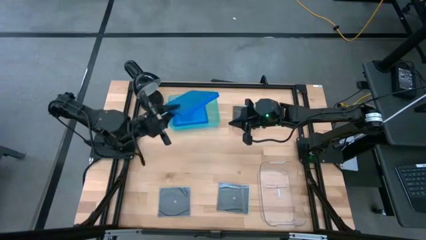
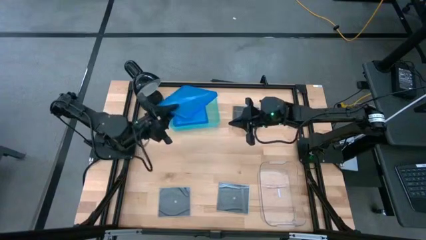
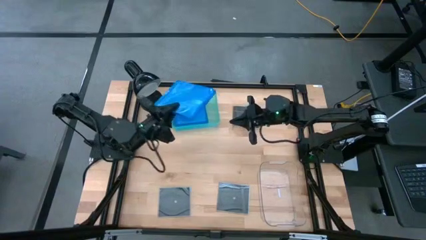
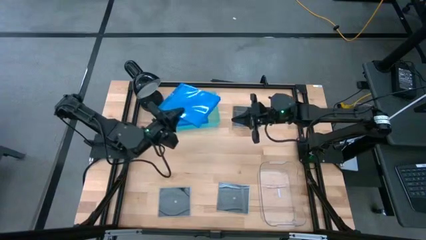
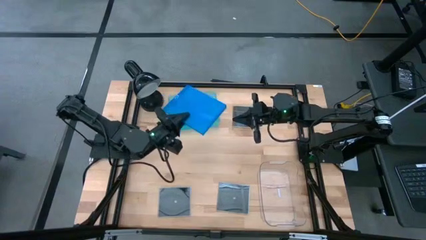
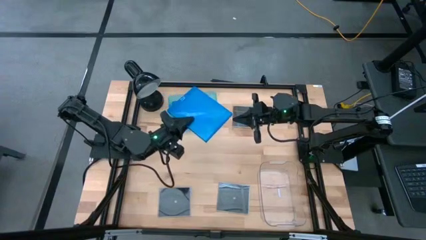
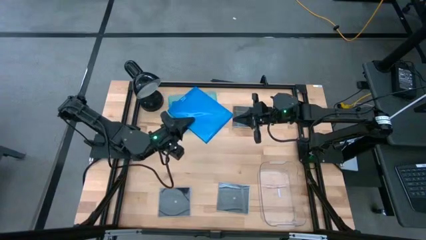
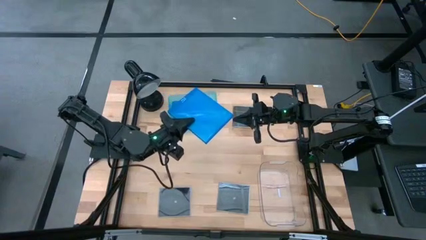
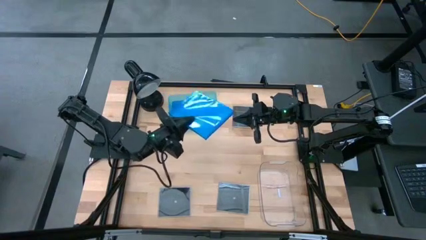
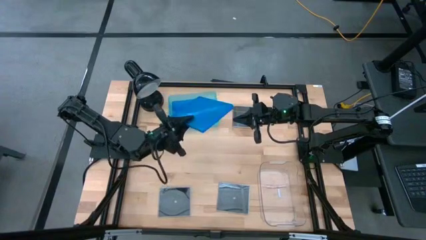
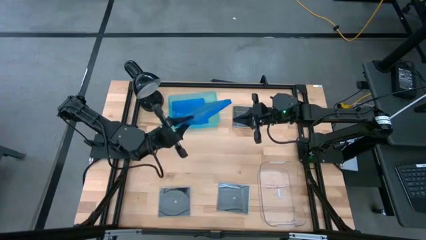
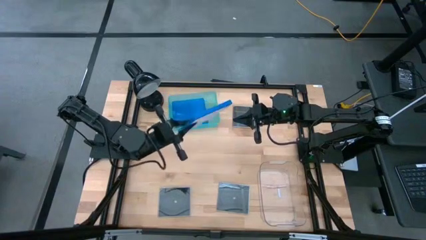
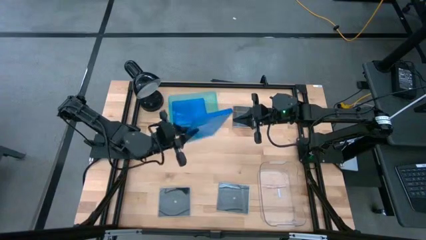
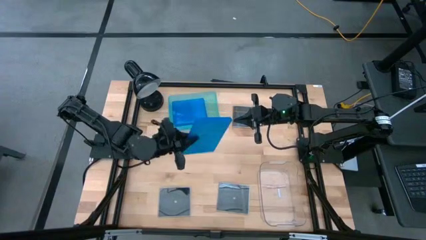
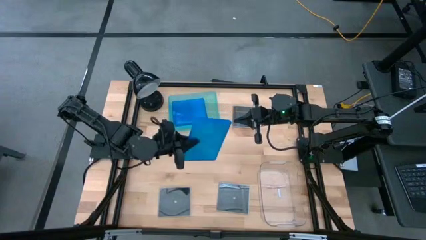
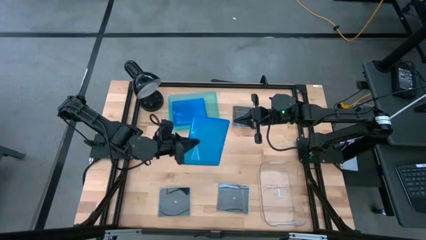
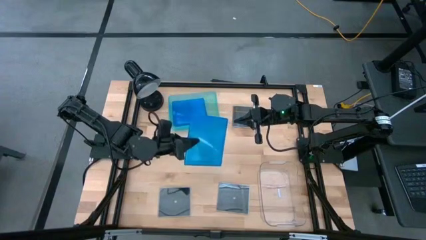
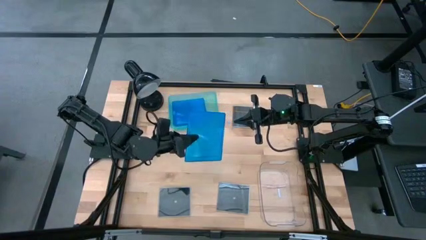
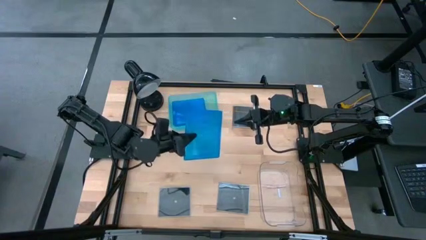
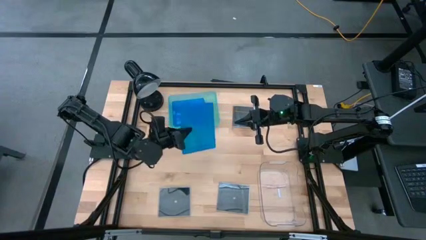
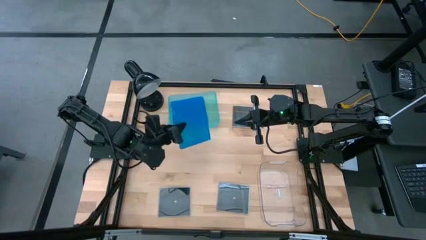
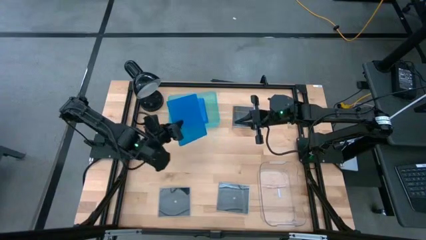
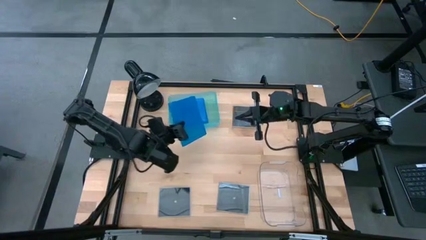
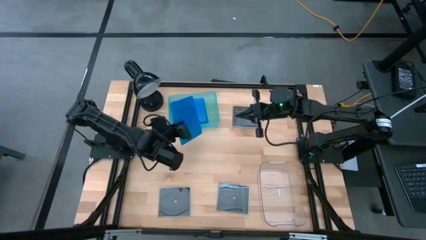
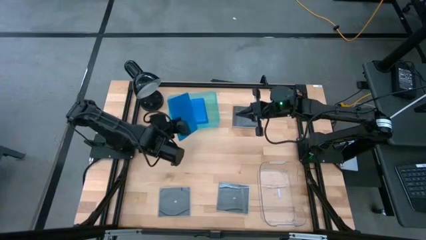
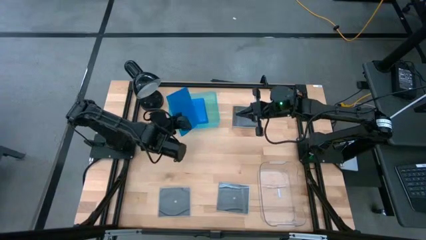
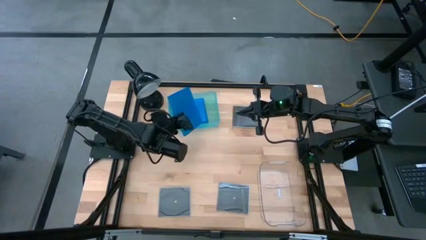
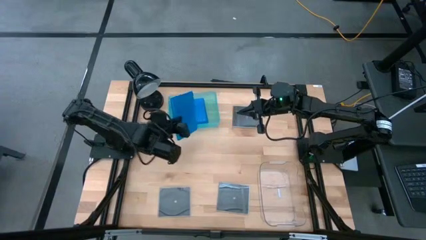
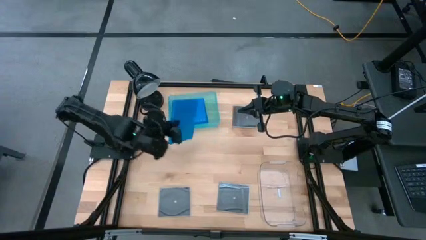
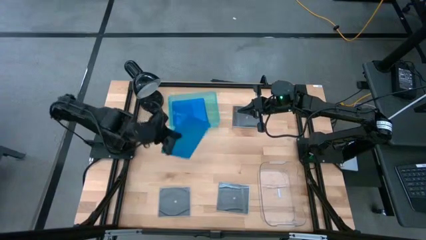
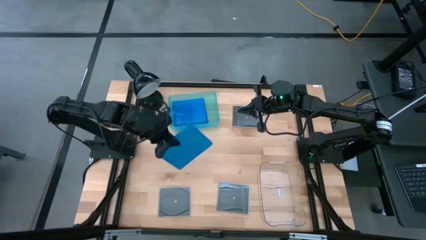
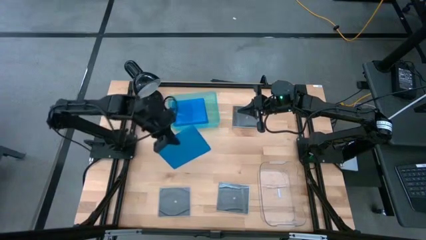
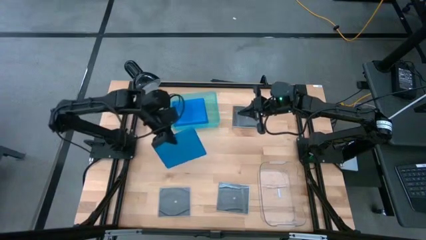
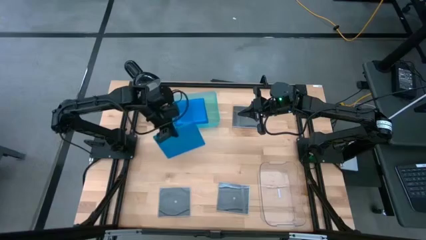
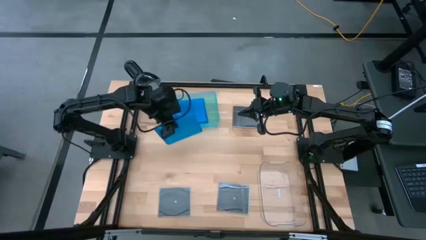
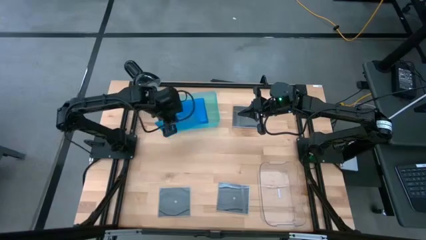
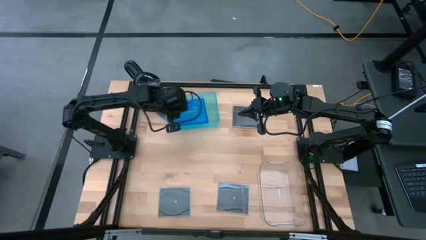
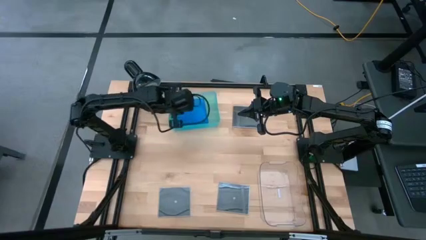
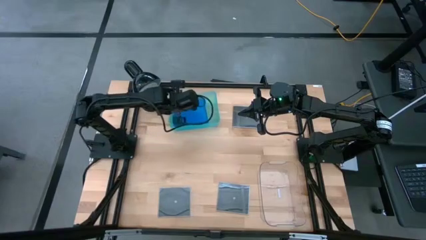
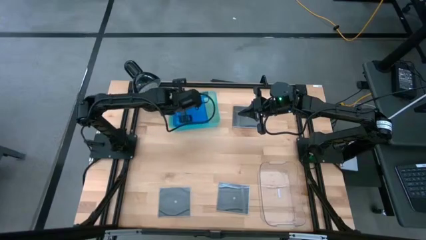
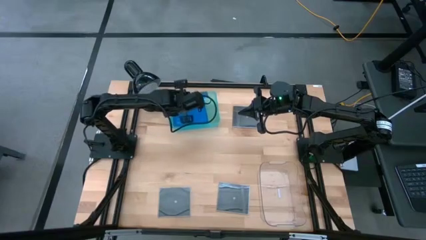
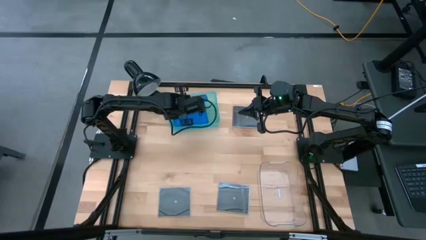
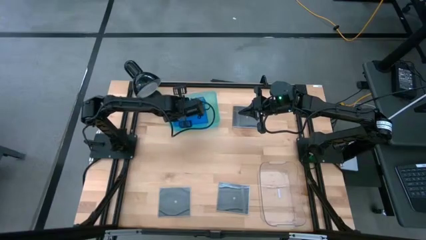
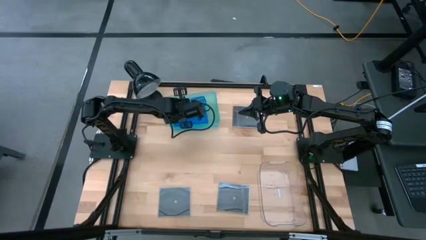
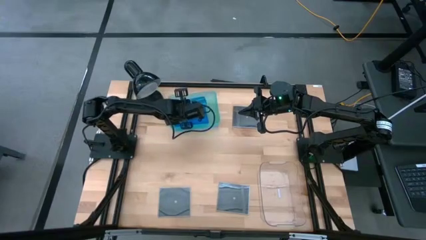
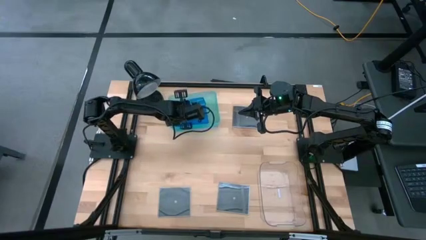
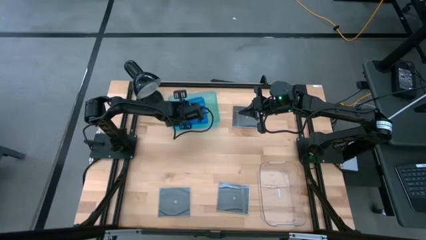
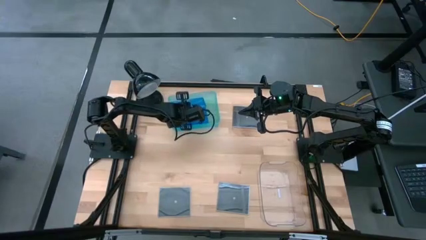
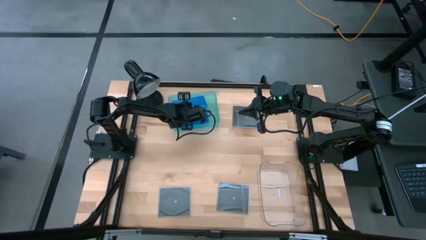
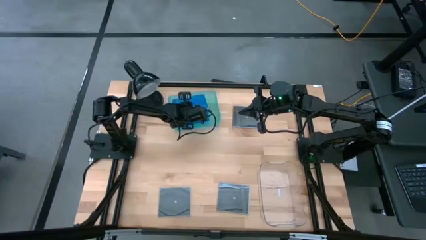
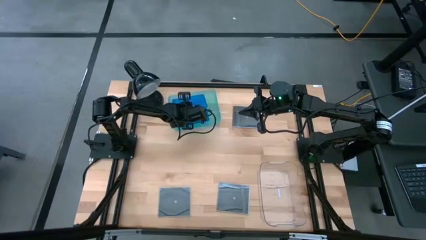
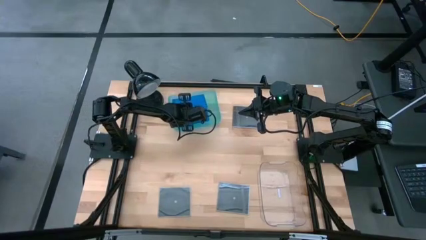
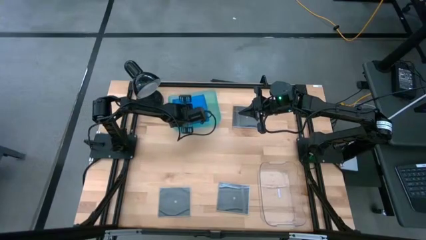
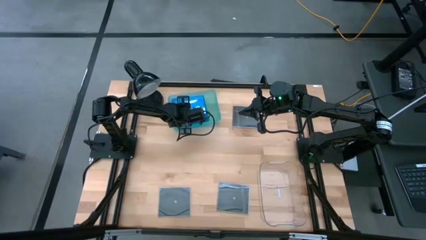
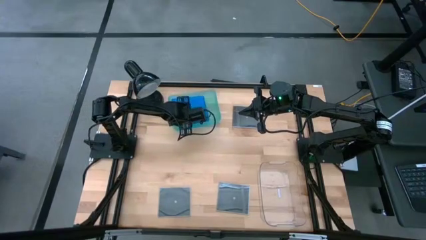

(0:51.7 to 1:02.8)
Task: Pick & place jewel cases by type
Put the blue CD case into the green bin

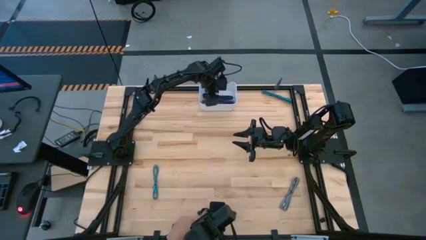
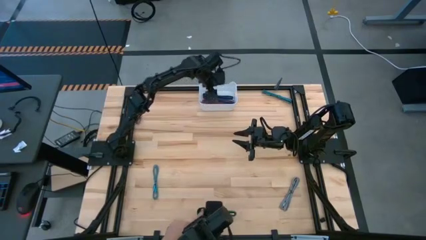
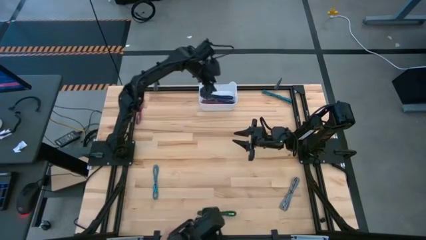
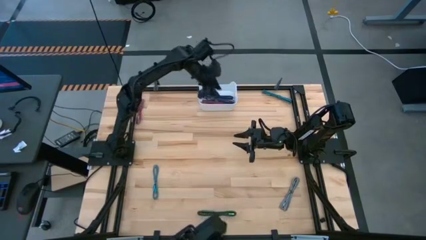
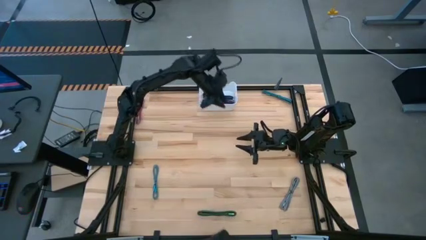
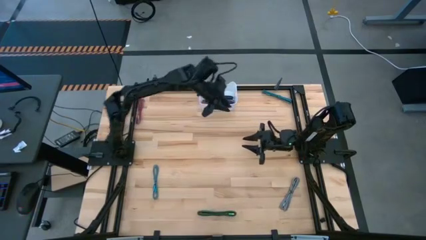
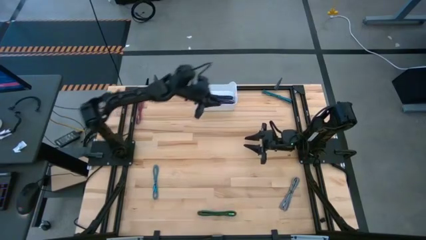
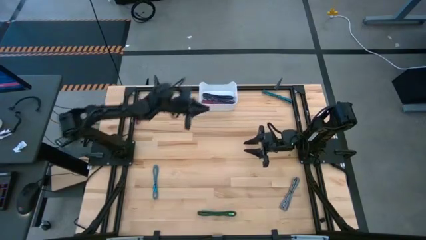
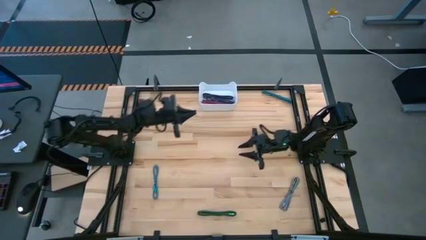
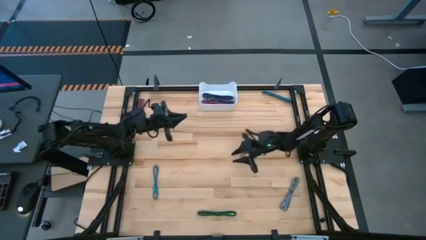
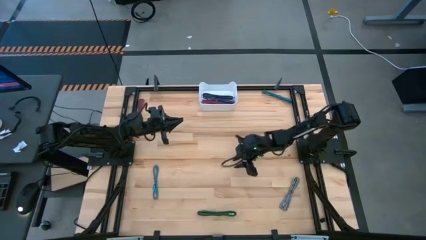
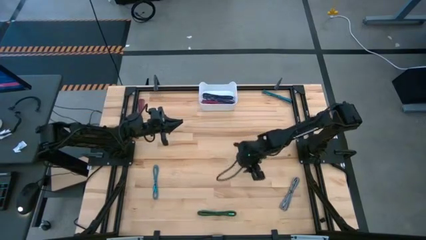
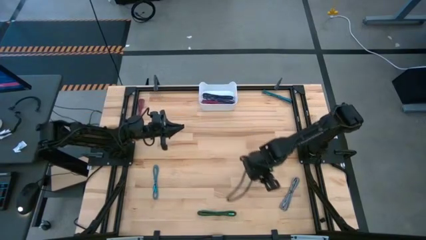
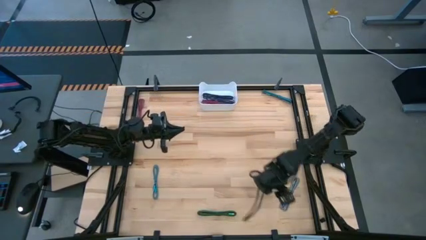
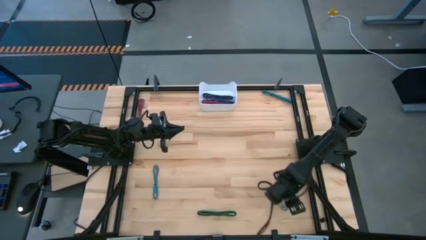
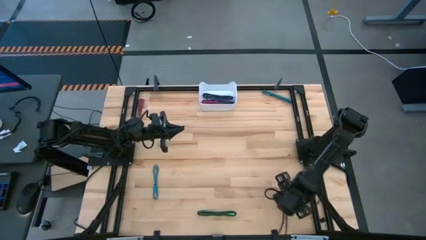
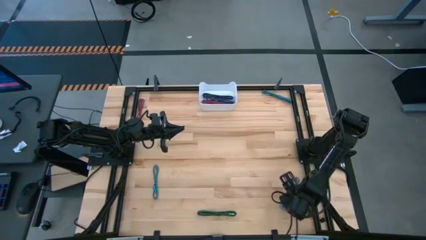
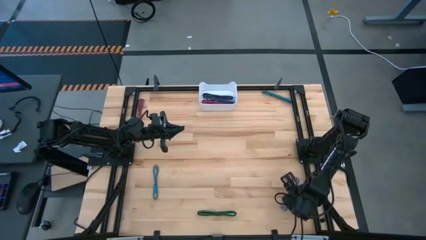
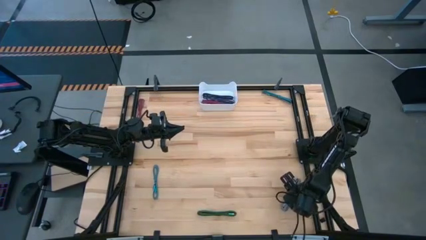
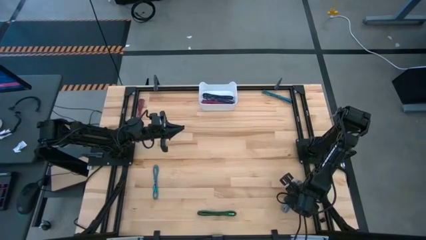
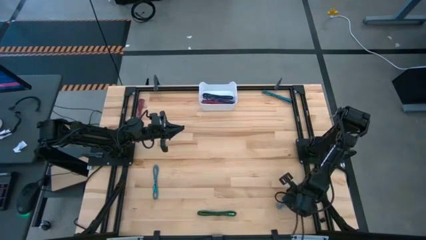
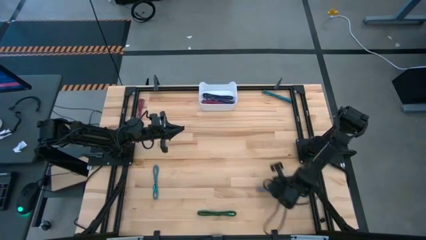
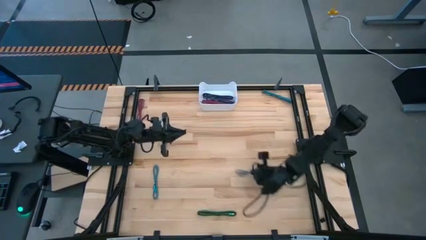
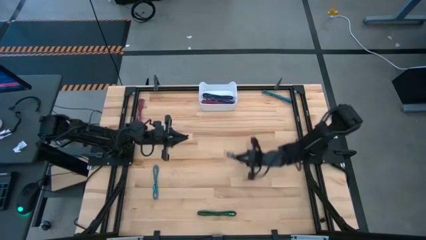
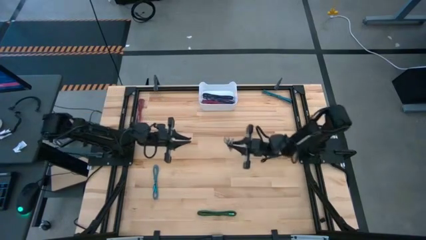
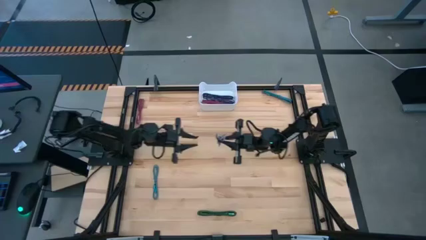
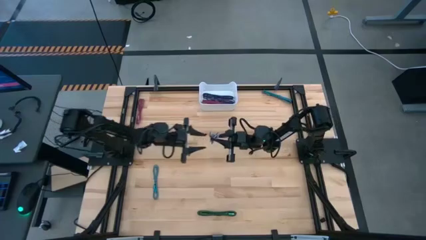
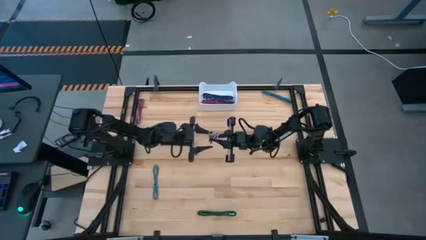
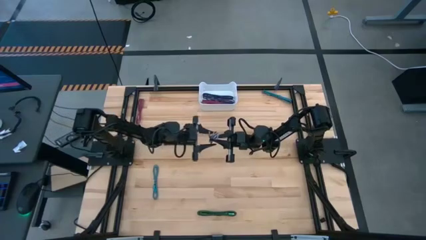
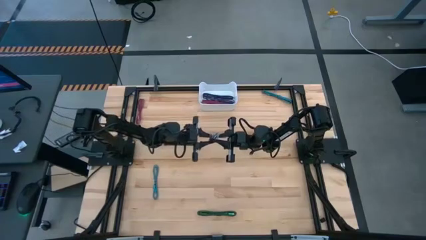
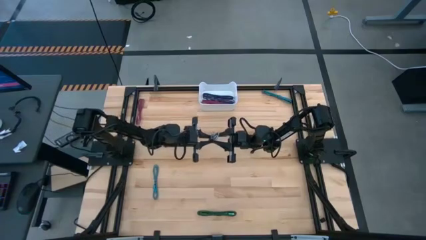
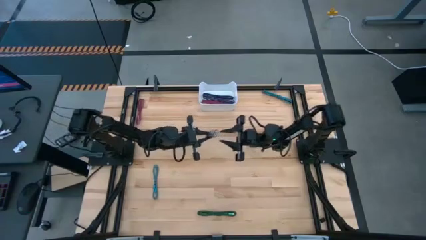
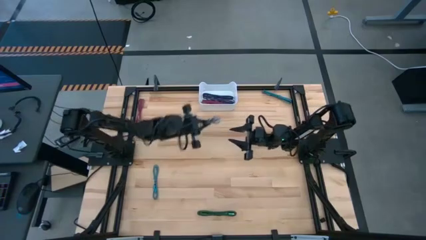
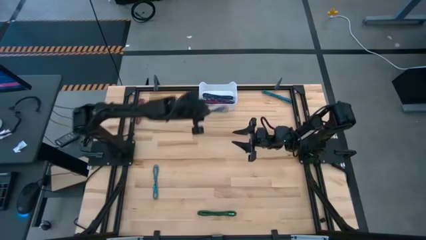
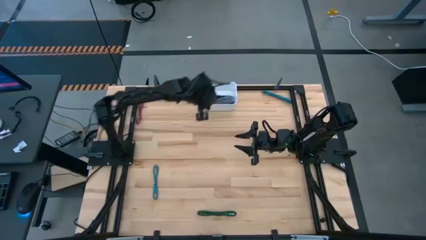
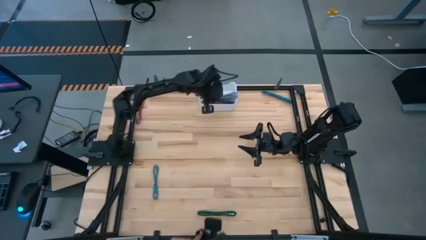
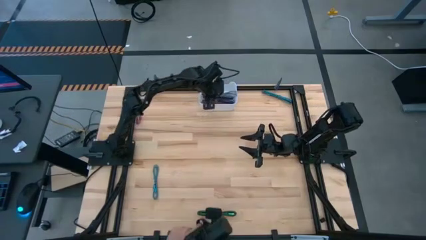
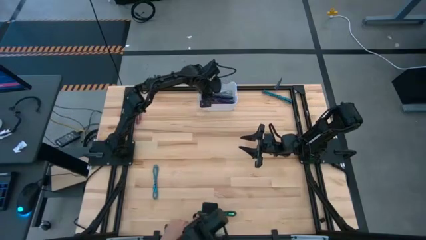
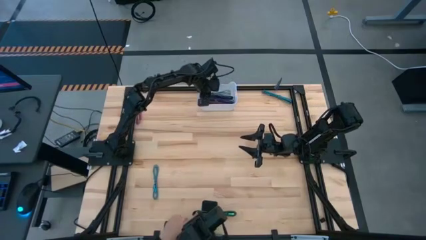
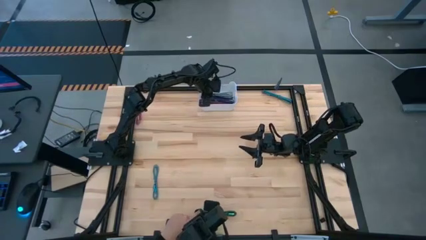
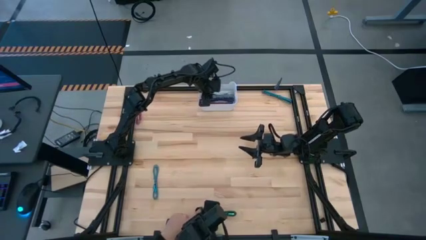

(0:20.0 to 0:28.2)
Task: Pick and place USB-C Cables
Put the white charger cable into the white bin
